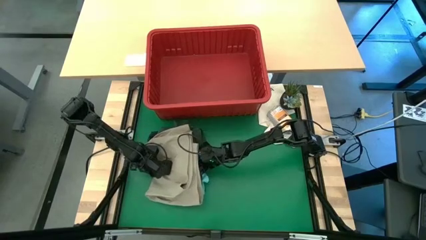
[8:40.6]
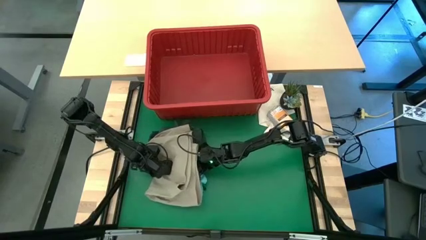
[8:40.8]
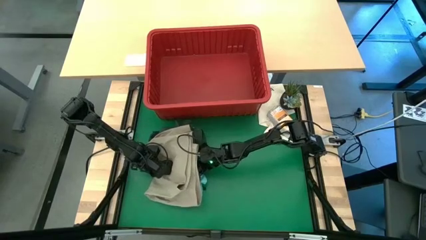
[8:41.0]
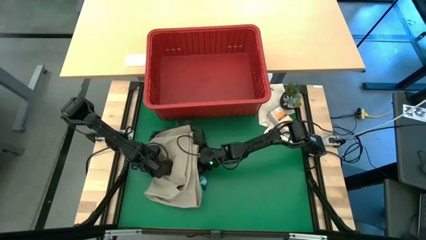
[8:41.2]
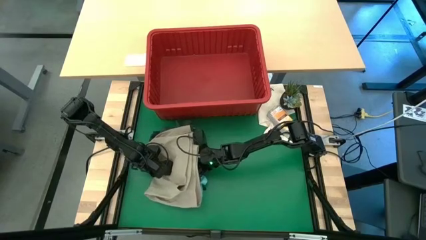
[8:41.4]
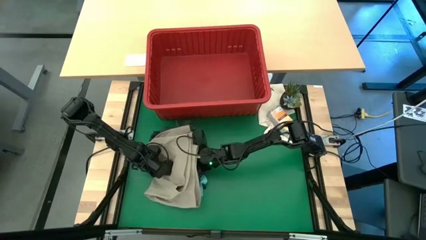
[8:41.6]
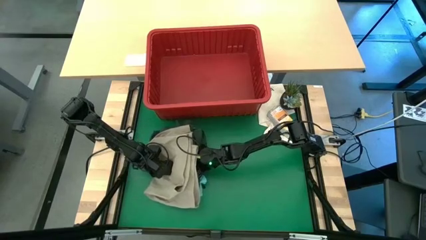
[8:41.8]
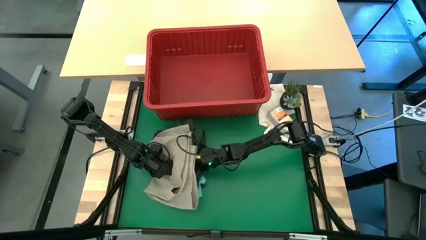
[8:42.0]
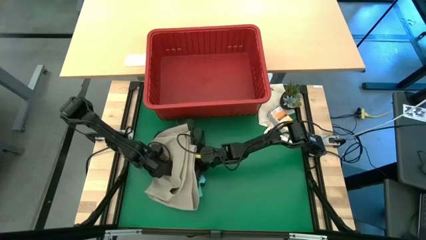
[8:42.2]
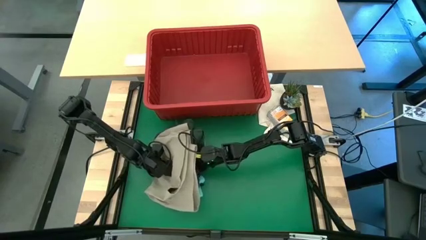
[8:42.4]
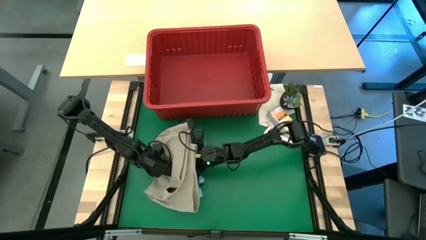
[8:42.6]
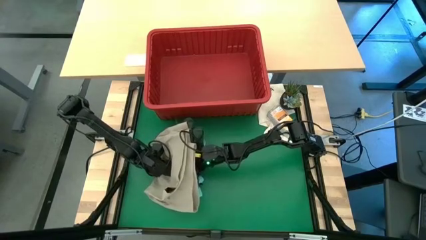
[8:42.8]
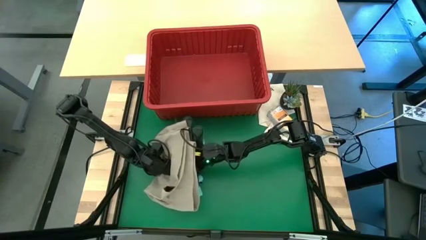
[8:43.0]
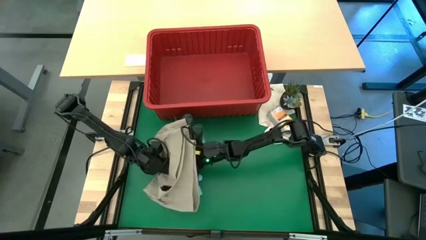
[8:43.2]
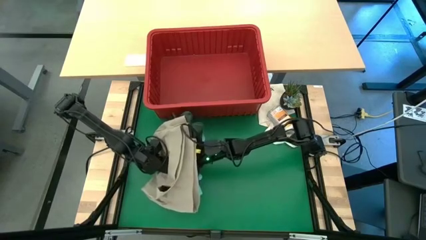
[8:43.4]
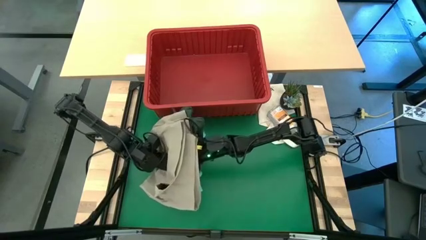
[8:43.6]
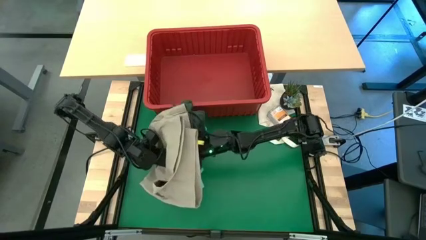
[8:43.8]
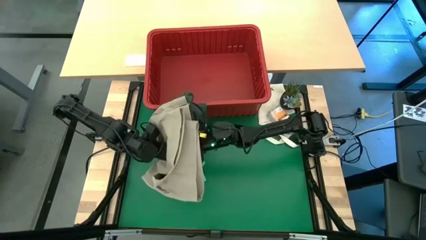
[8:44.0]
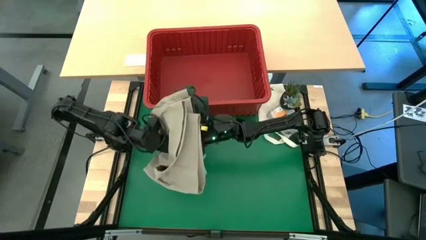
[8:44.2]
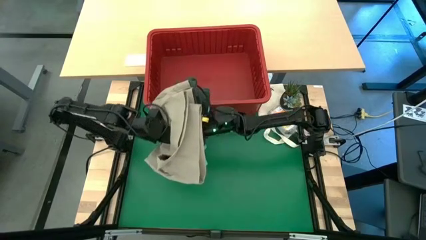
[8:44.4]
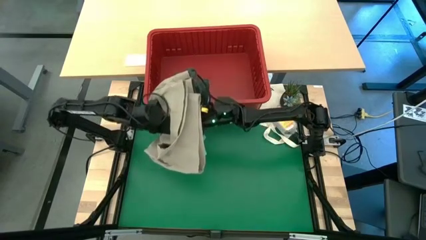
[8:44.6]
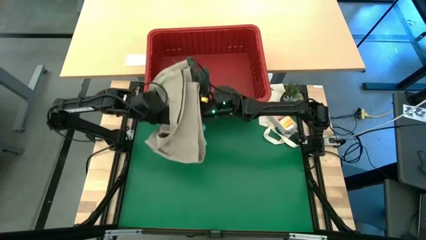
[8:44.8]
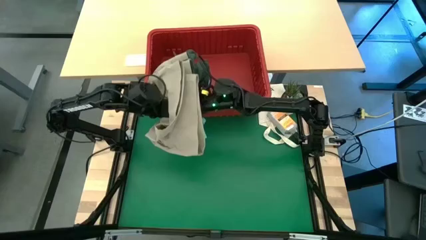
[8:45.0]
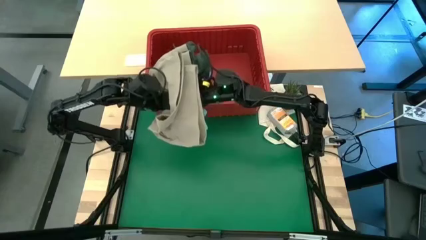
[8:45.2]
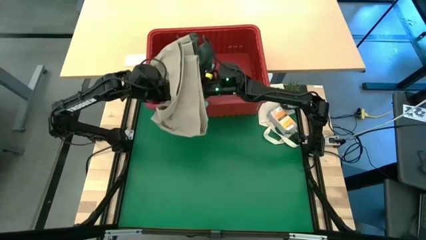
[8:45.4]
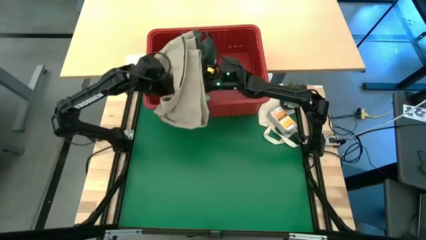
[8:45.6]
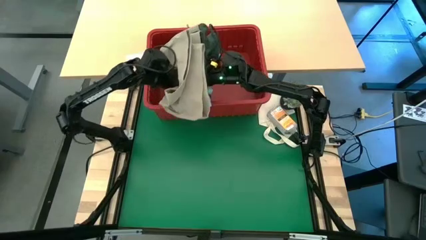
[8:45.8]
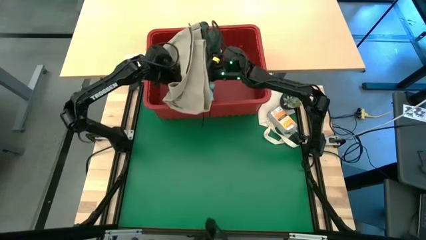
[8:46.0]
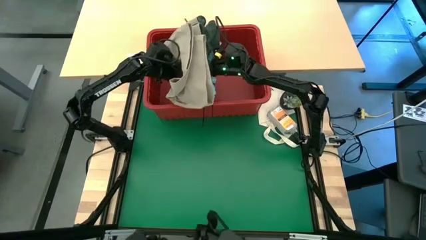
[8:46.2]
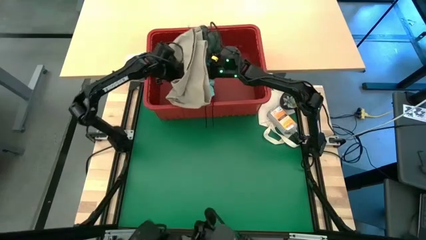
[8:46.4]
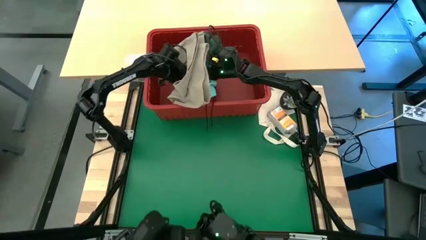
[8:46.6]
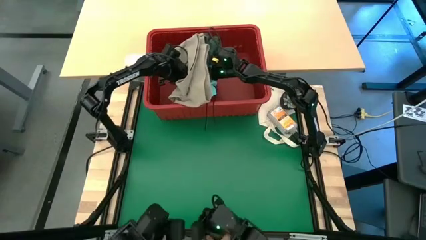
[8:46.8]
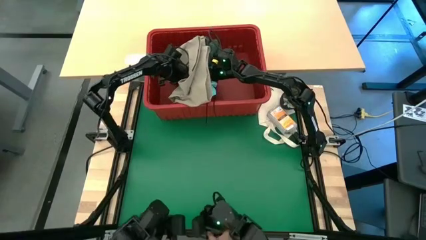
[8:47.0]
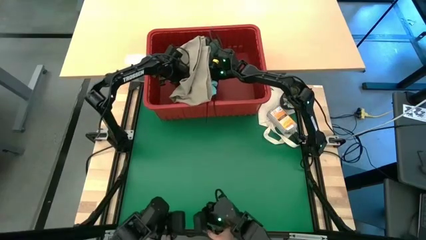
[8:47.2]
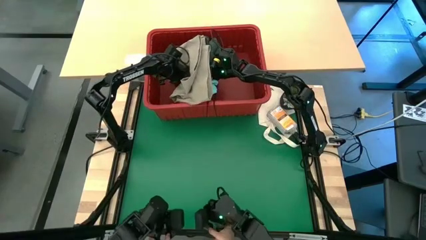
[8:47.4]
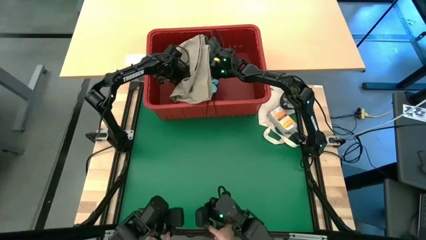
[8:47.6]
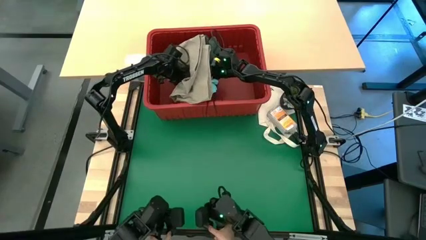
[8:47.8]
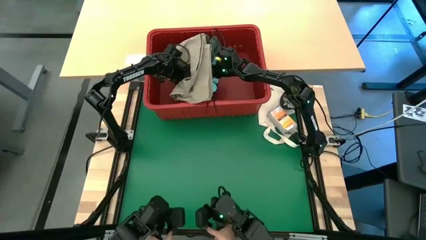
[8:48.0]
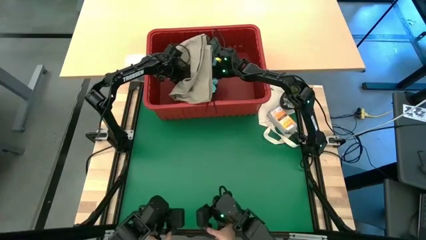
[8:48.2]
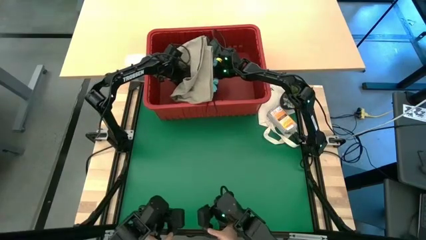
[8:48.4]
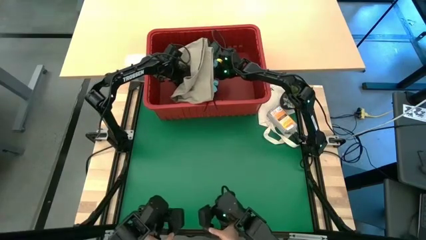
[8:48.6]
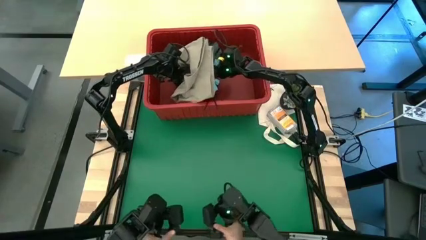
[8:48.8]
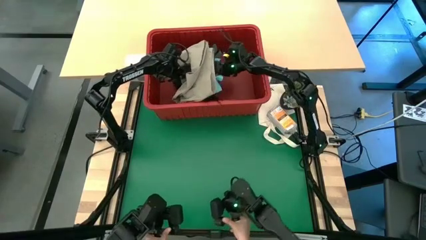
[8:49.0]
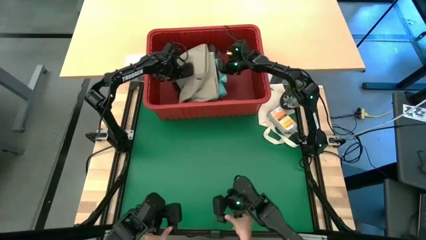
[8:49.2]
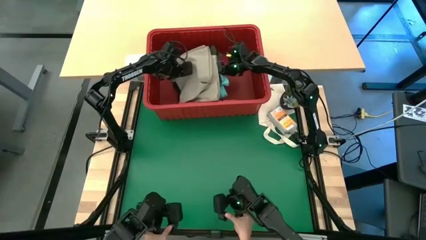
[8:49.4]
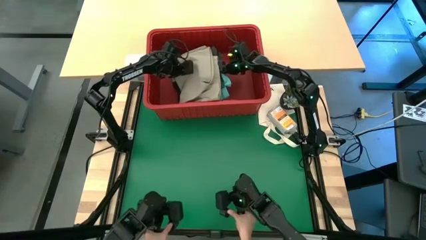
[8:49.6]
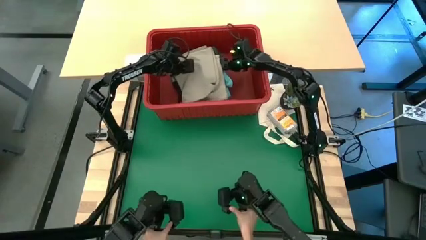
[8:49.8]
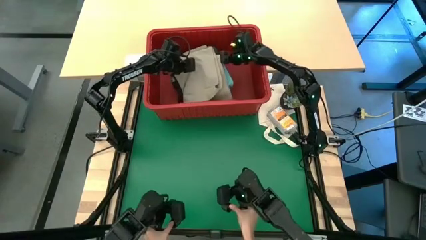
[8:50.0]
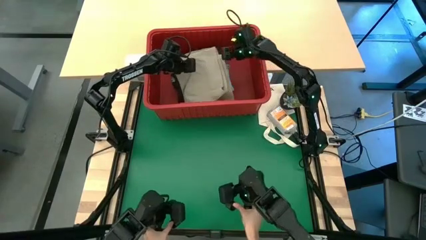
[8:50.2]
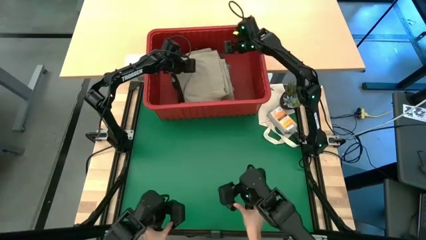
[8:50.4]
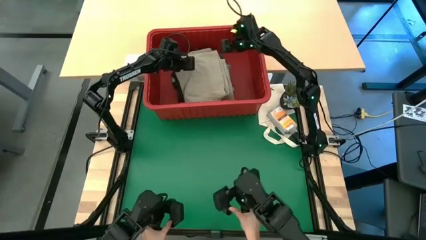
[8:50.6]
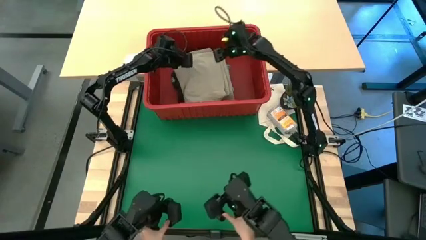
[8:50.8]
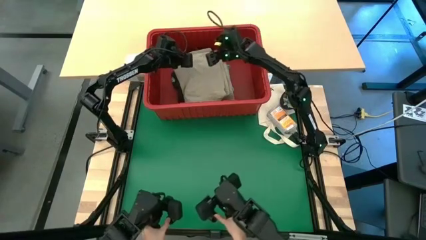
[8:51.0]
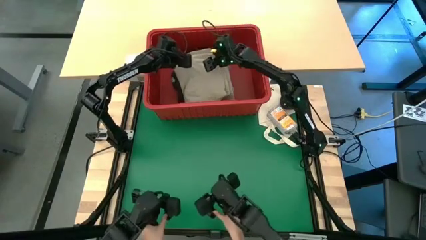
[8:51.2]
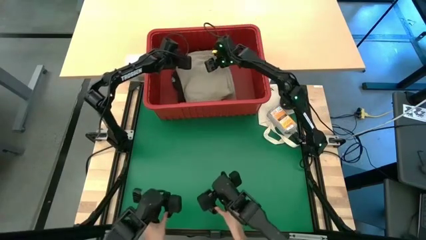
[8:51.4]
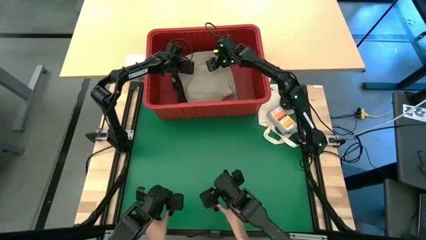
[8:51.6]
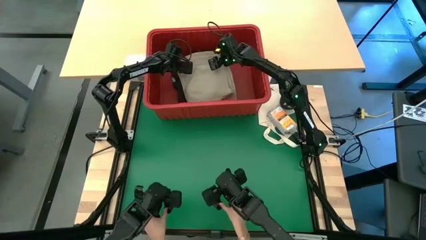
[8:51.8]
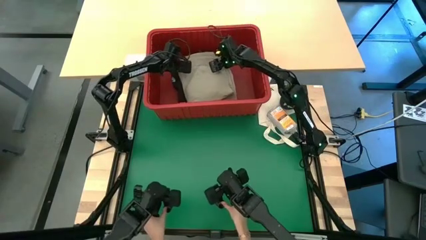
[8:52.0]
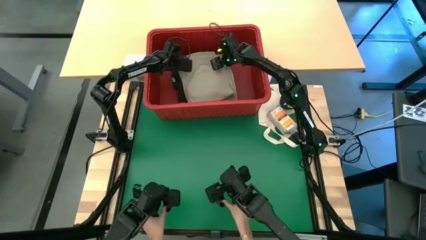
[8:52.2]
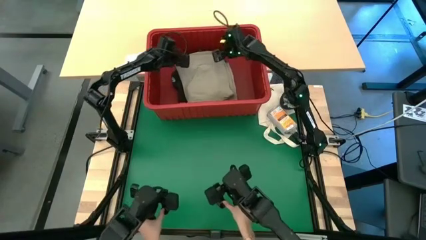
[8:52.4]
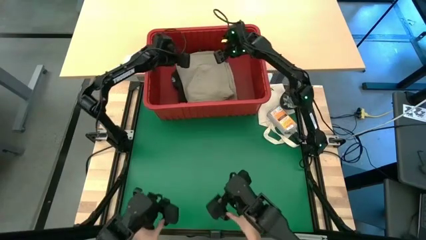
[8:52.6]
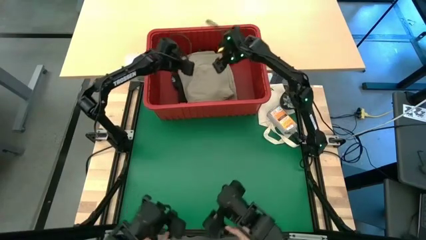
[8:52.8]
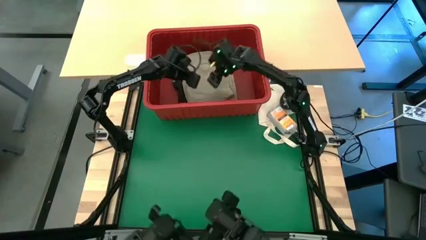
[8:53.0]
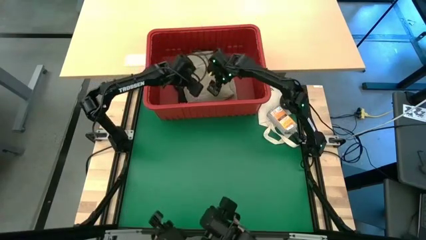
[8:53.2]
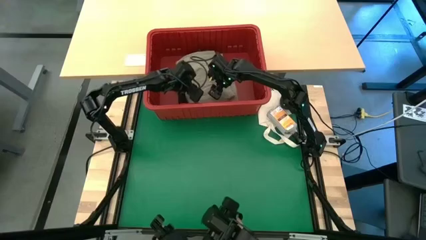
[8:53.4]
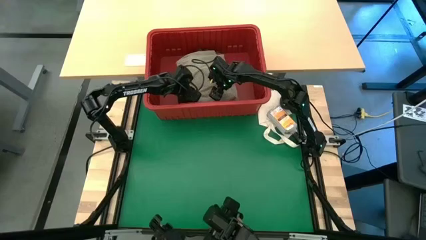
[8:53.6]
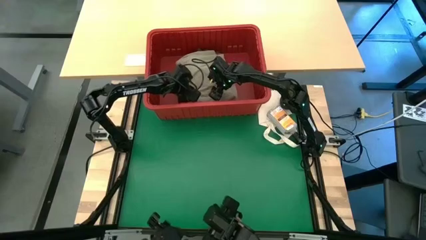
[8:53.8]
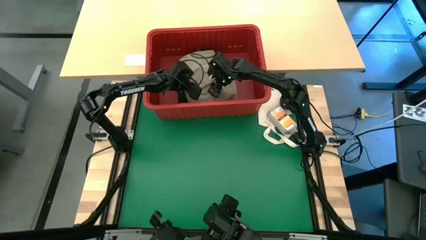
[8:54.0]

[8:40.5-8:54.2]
Task: Fold Laundry from Bin
Put the stacked clothes into the red laundry bin

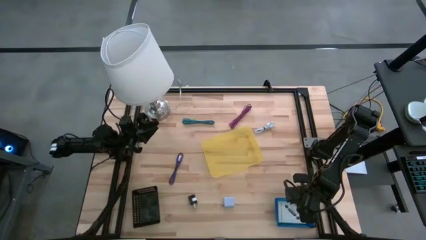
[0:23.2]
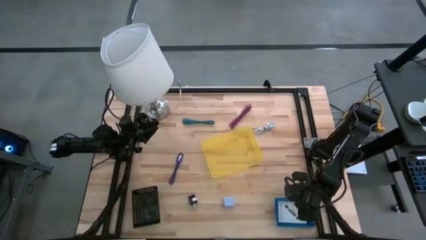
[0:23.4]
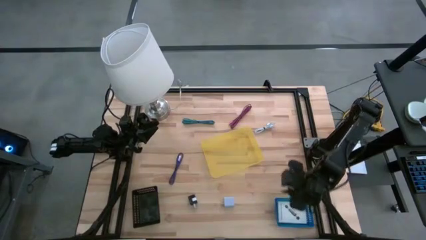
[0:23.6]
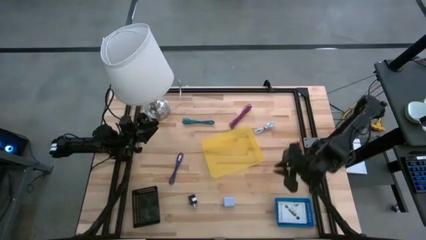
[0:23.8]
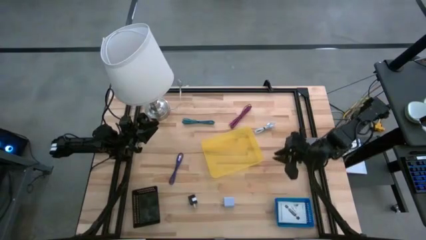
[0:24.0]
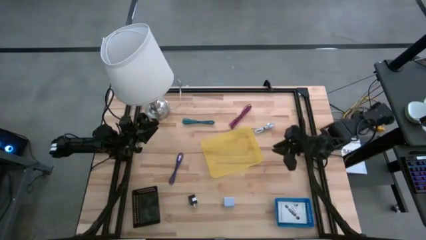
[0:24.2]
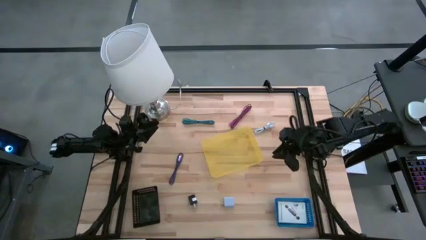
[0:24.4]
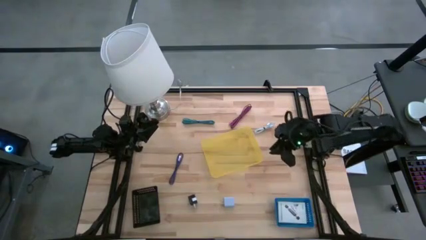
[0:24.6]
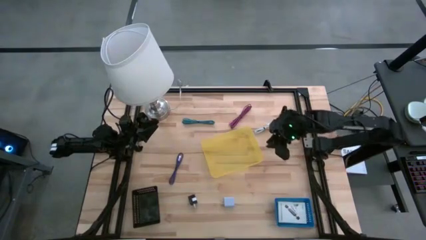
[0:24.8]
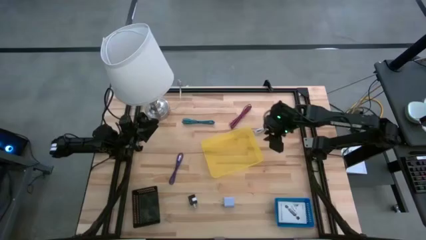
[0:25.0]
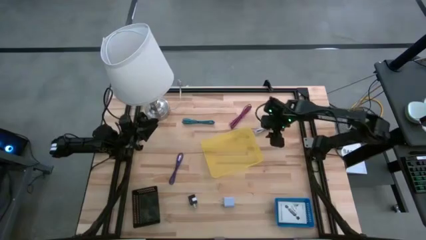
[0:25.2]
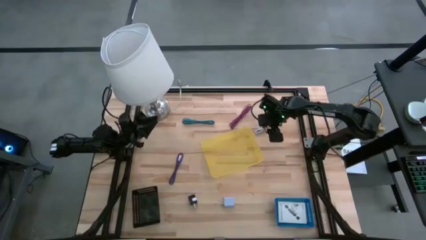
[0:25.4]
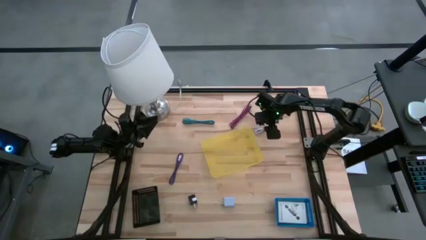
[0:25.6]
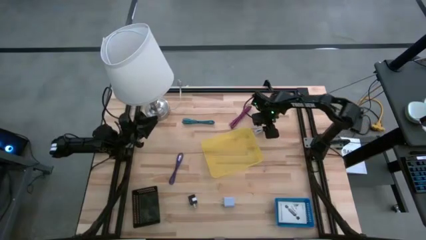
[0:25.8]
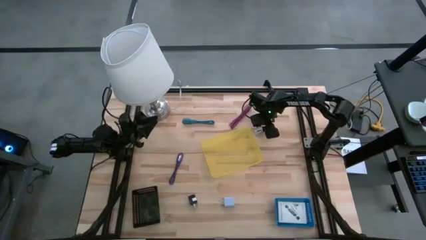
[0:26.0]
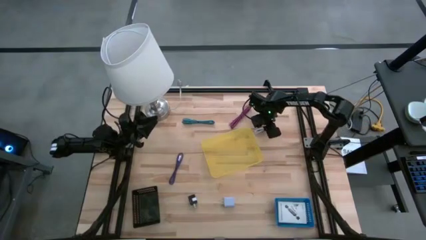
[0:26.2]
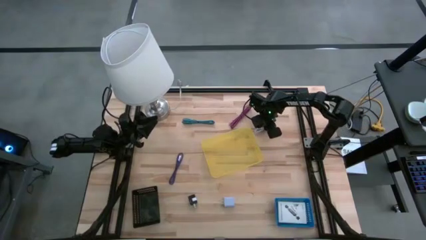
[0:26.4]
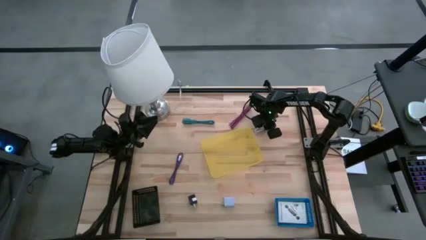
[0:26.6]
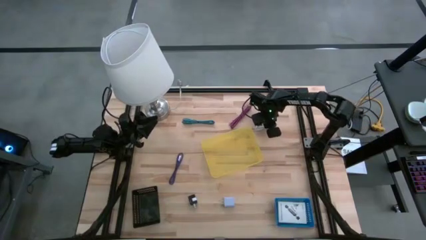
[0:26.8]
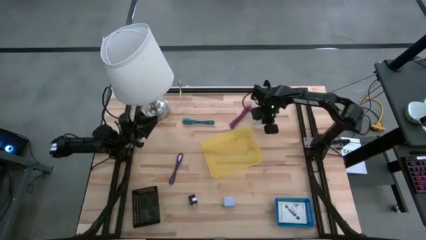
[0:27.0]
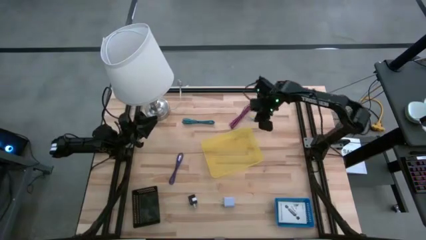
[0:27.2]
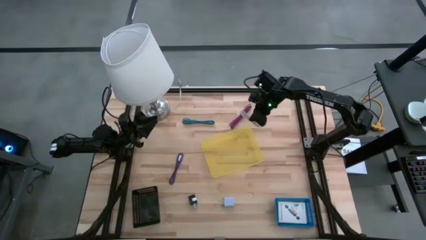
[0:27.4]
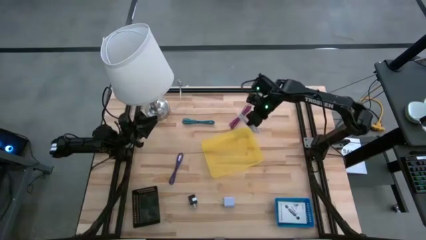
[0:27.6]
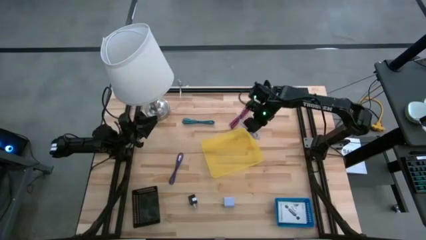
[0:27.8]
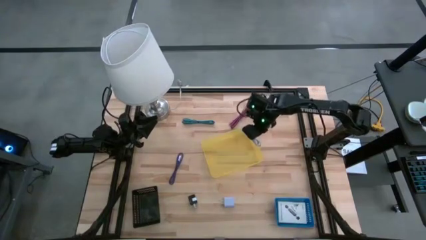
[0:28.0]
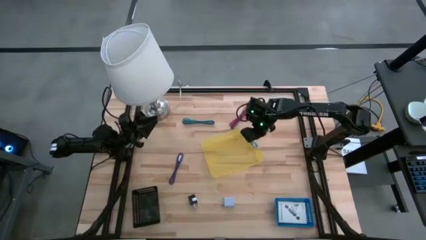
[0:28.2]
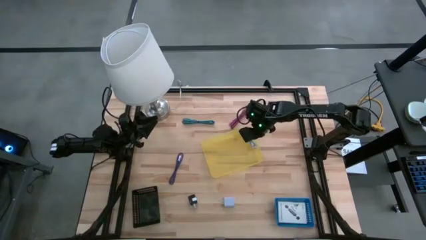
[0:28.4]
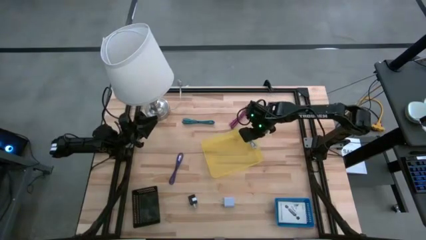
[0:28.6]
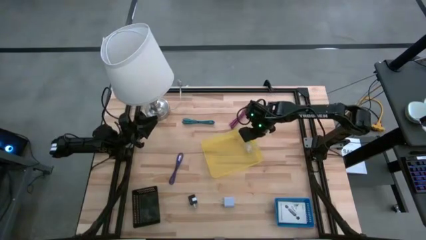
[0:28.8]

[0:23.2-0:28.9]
Task: Pick and place items into bin
Put the white charger cable wire into the yellow bin
